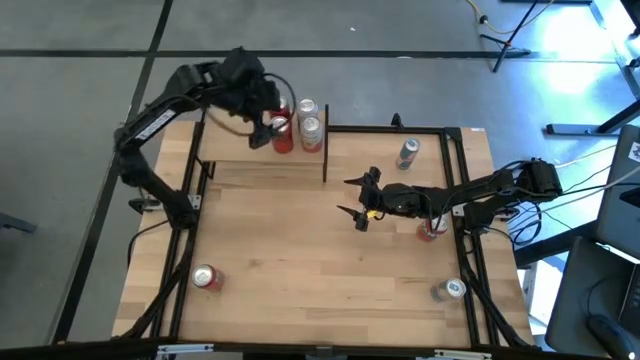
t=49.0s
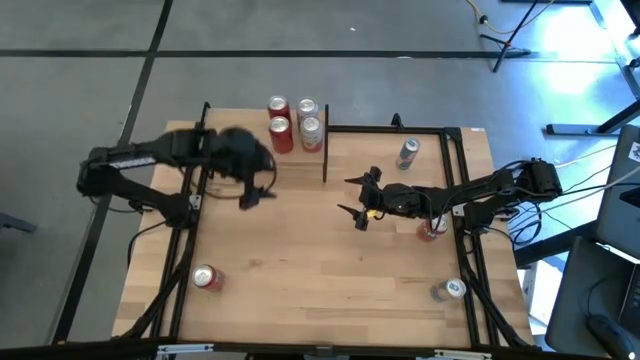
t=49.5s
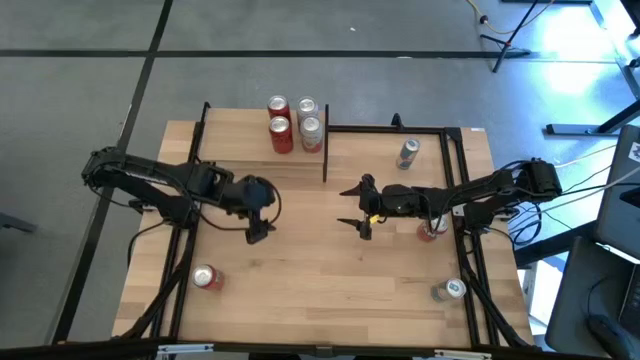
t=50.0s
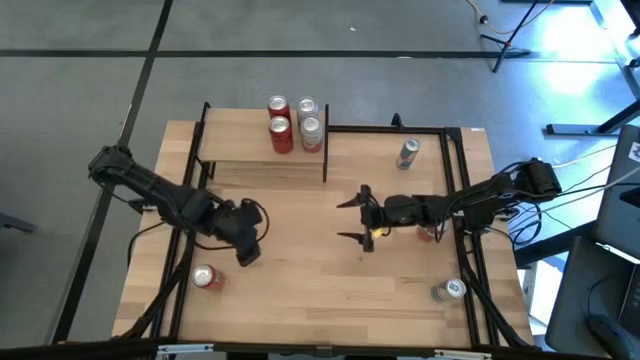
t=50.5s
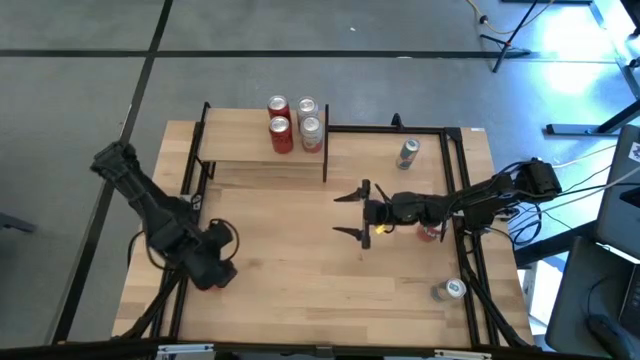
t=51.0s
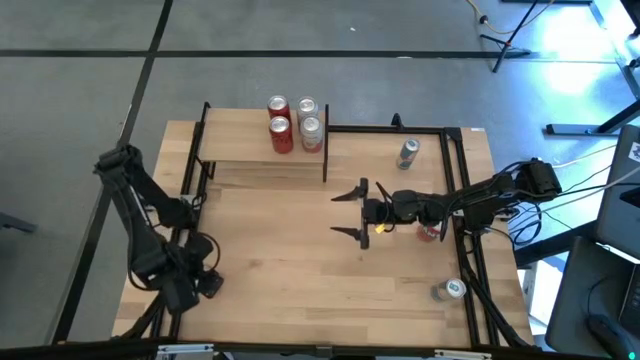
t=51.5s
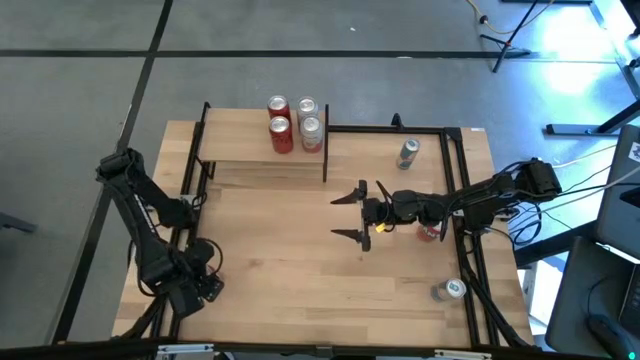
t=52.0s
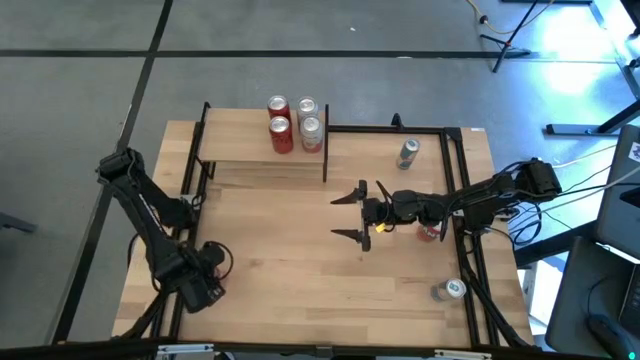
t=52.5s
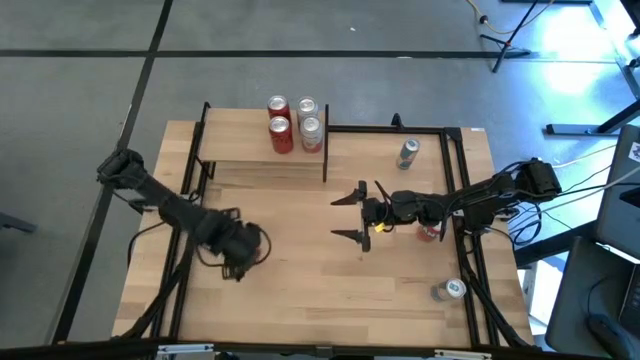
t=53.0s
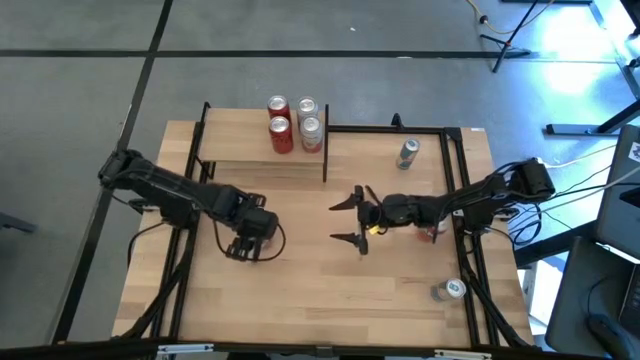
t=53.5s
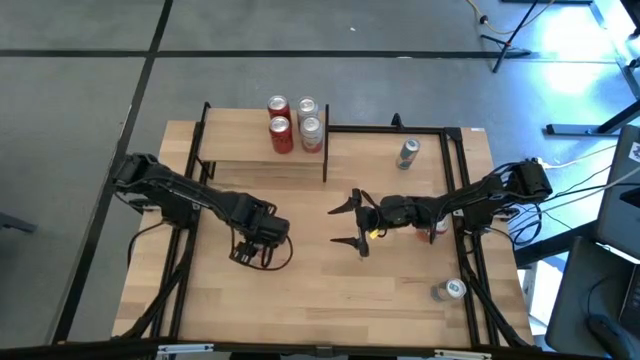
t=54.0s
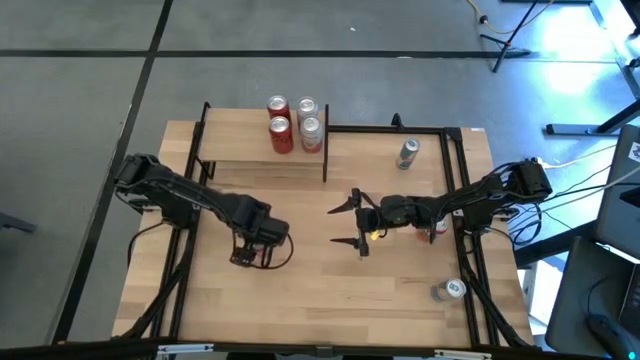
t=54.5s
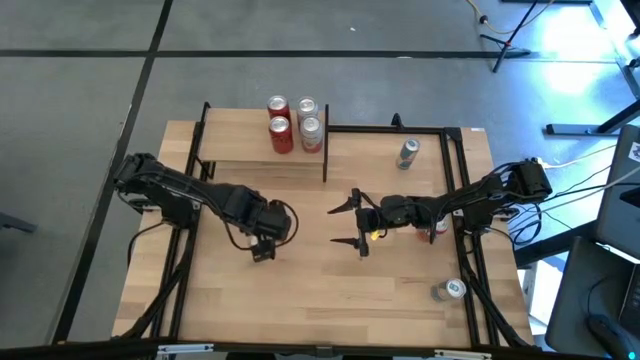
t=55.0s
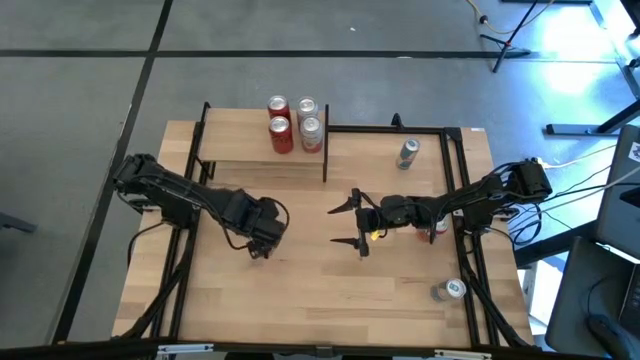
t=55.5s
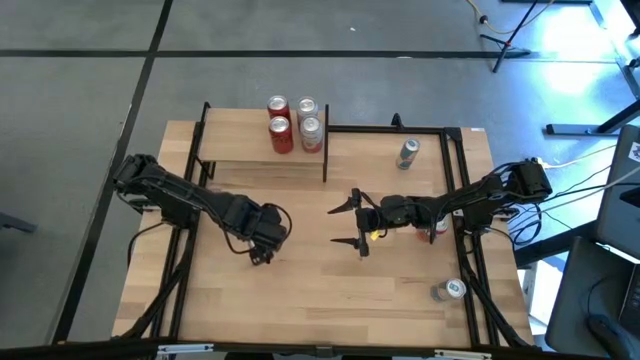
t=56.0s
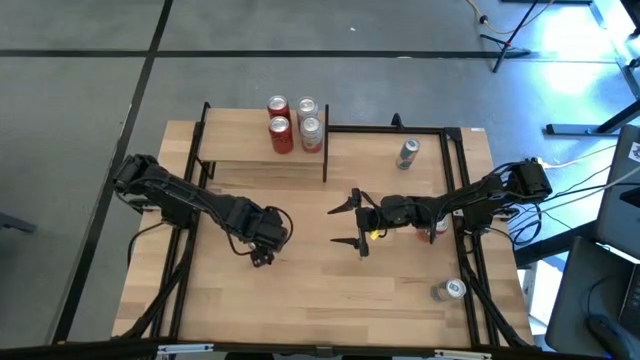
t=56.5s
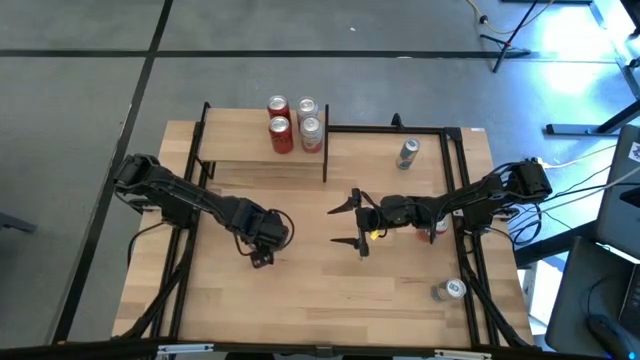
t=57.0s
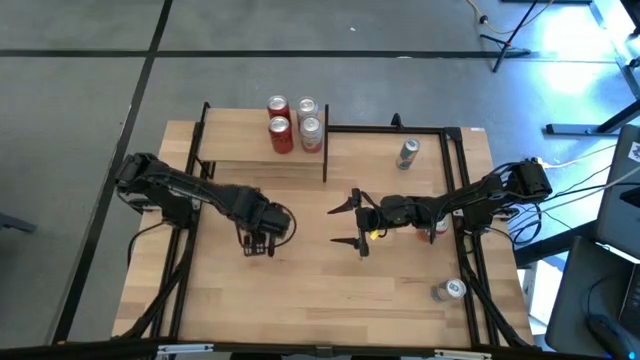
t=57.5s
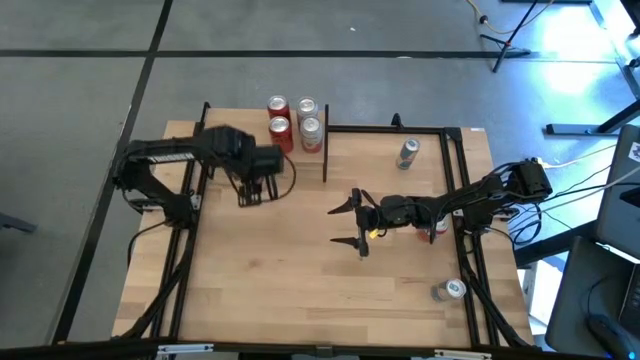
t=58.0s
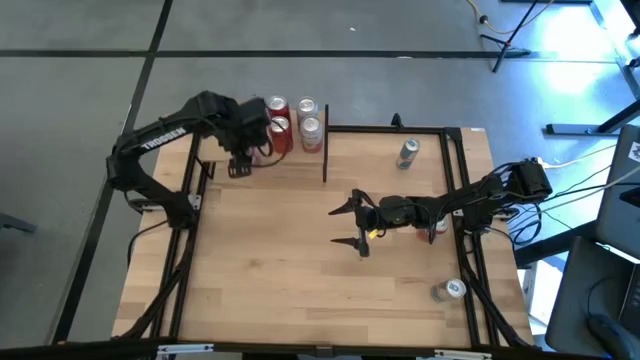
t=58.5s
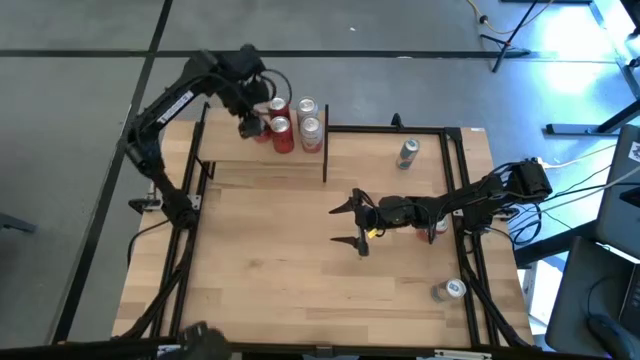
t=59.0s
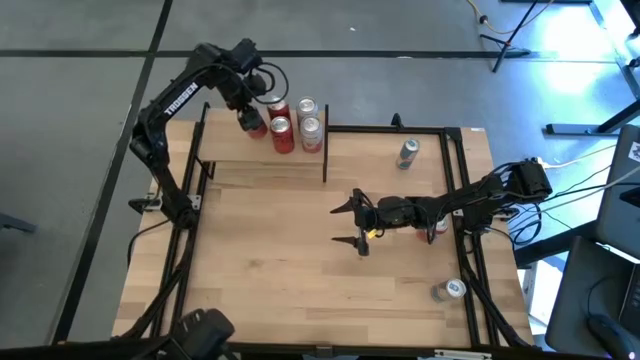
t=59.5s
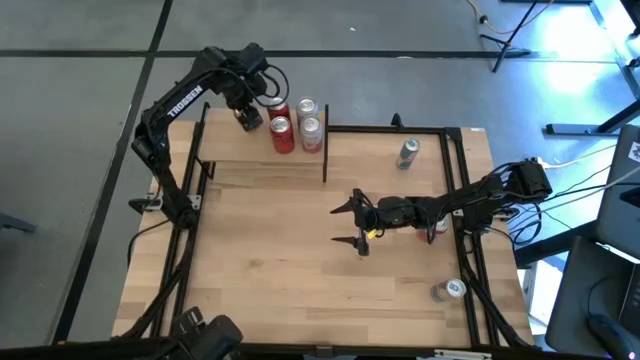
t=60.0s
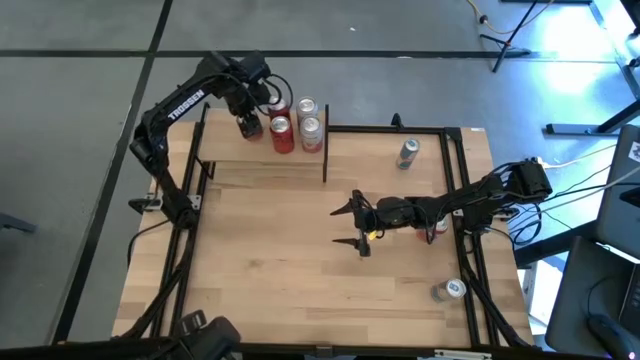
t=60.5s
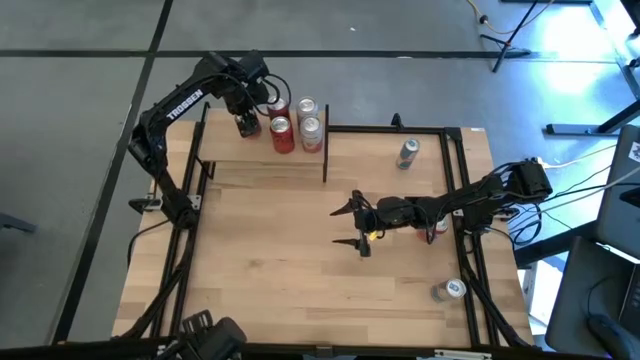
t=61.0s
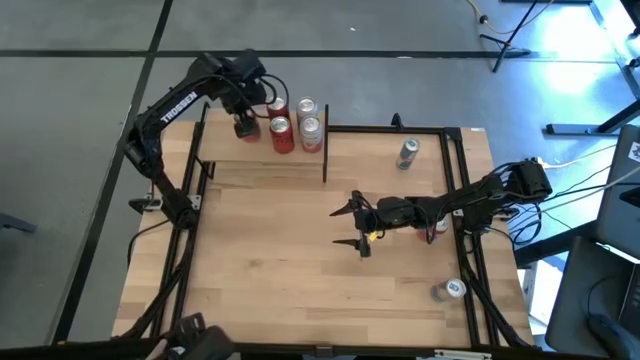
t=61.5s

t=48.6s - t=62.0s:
Task: Place canned beverage on shelf
Put the left red soda can on the shelf

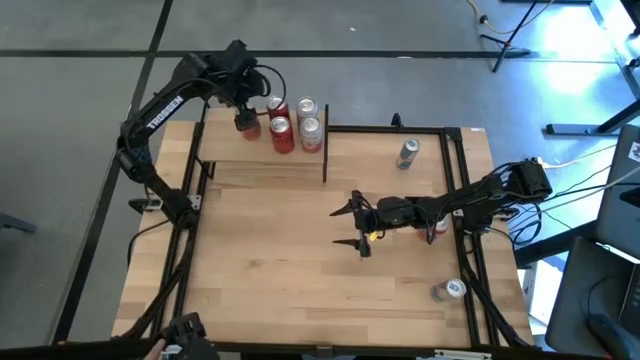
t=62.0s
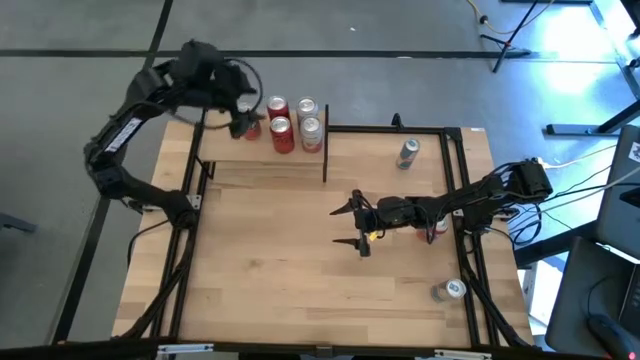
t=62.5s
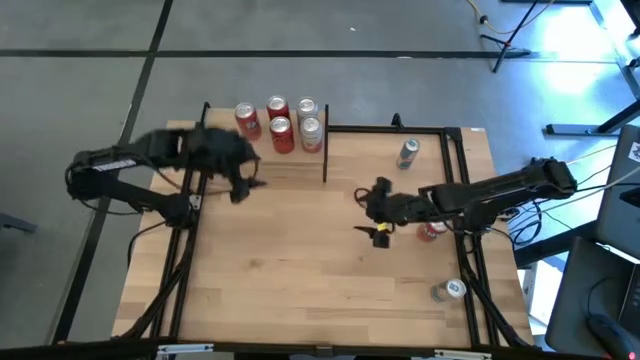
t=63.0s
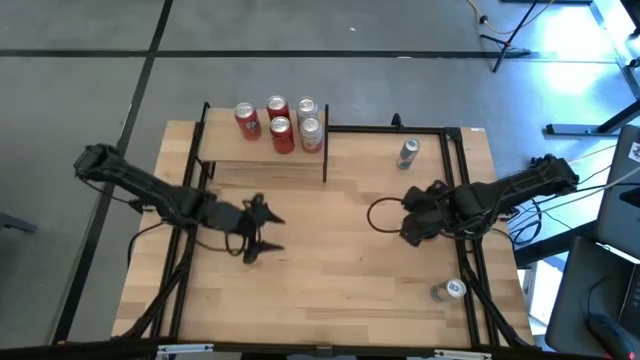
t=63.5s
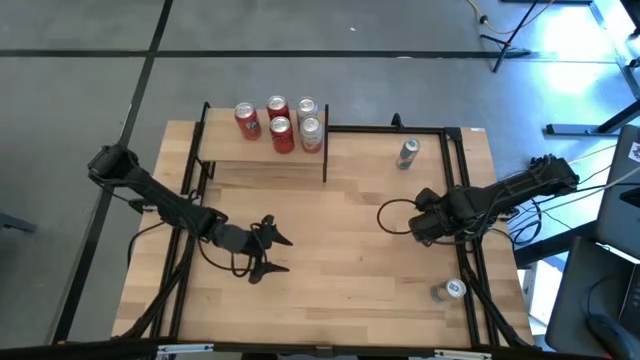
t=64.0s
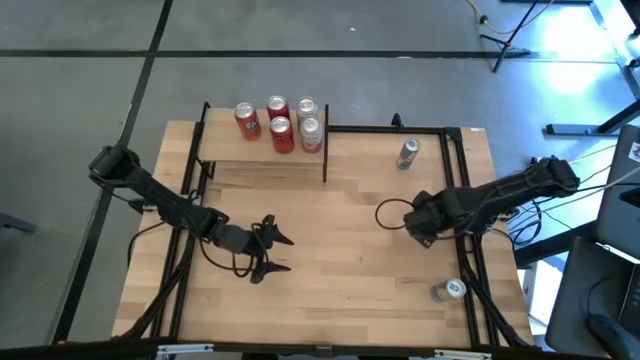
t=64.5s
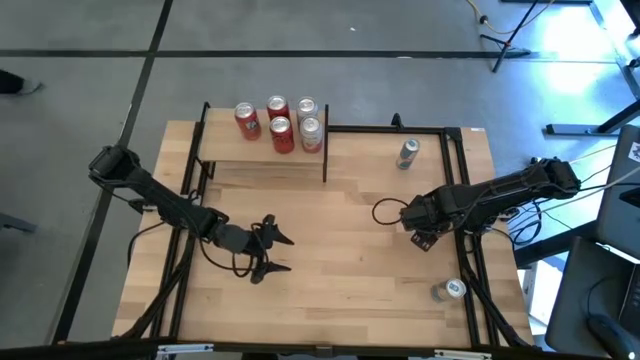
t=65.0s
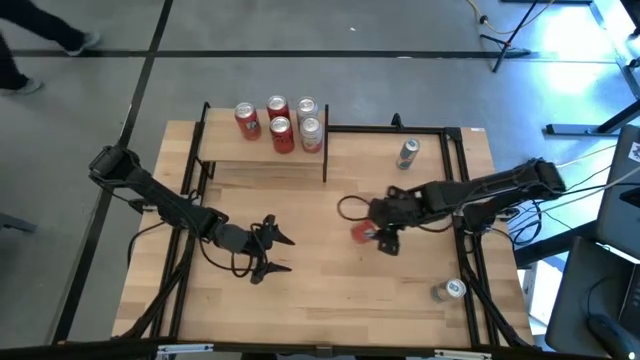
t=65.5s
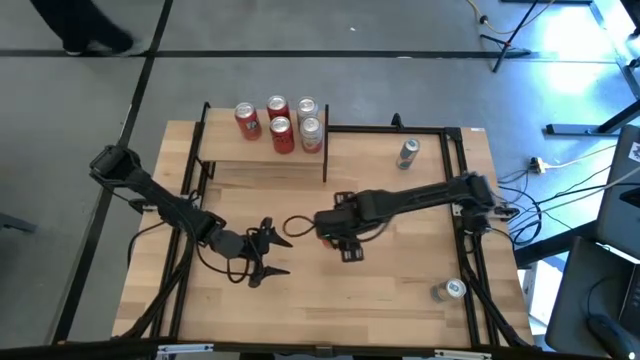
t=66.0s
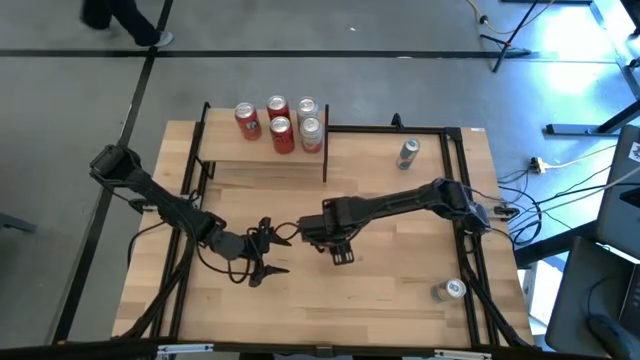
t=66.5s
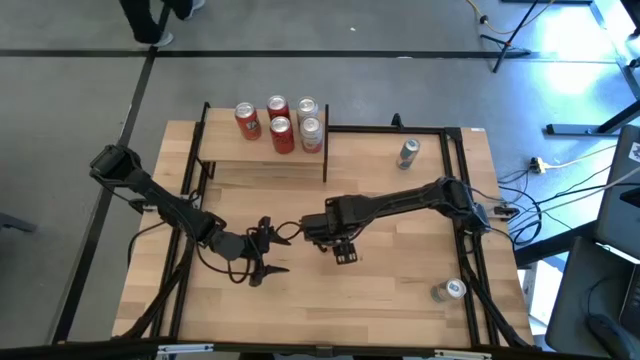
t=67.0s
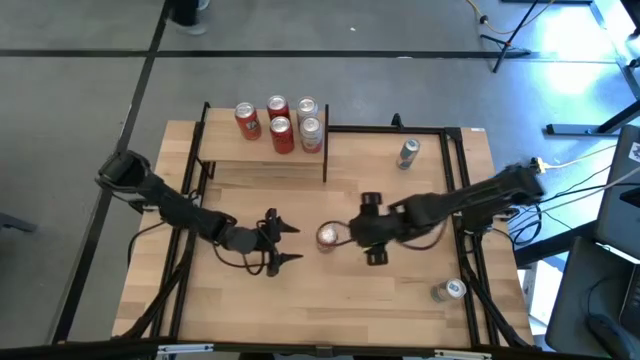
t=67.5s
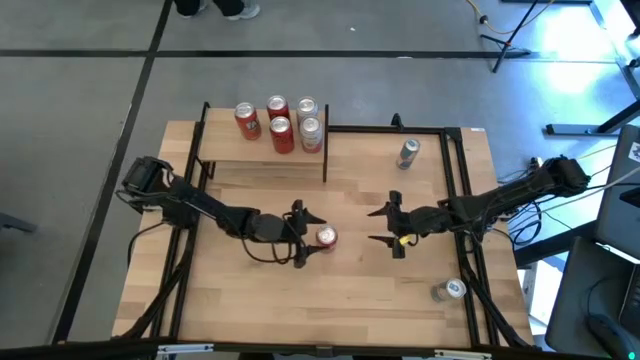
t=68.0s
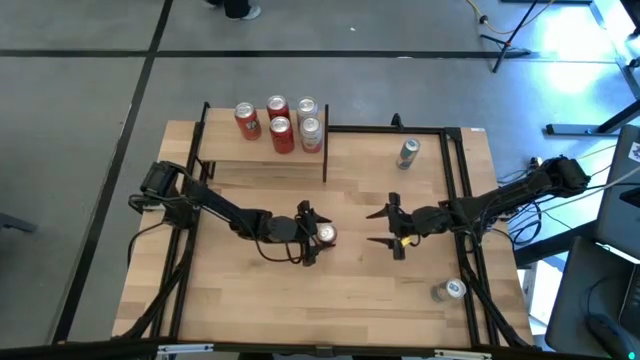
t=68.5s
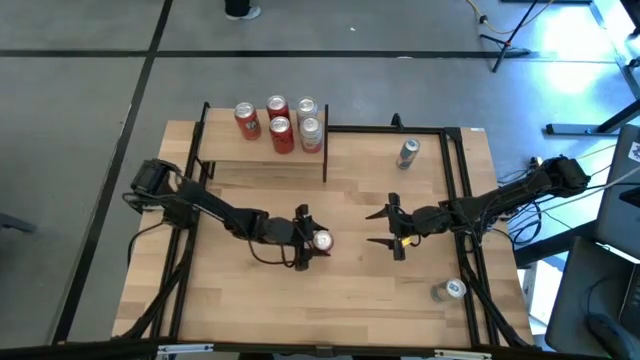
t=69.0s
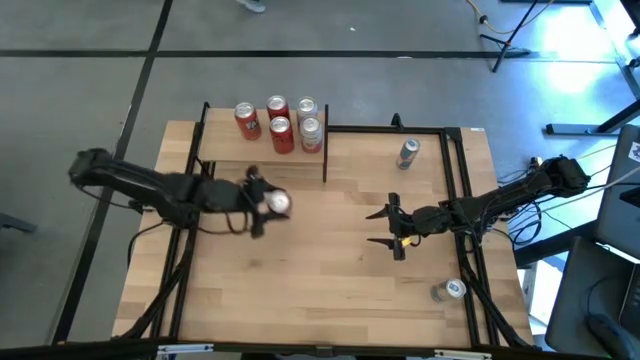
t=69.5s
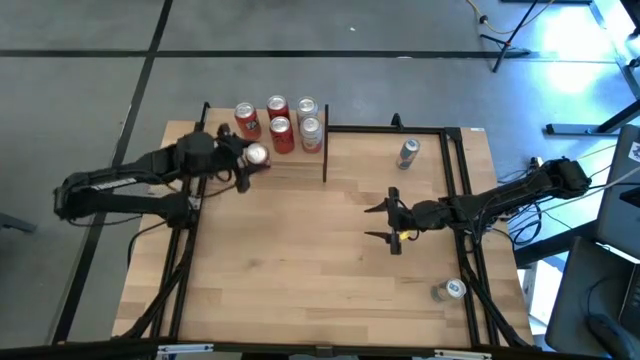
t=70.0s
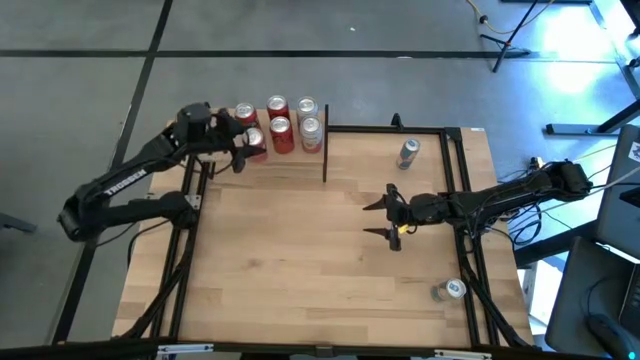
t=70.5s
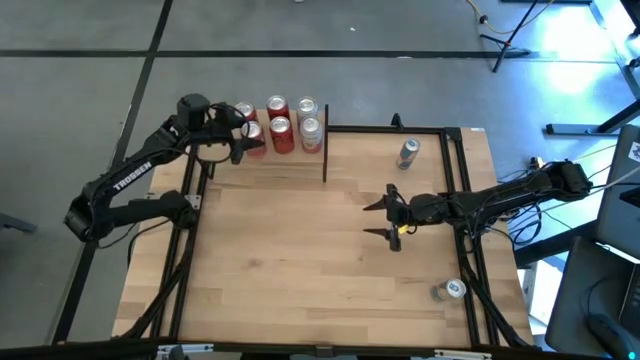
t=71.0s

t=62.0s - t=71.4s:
Put the red soda can aligned with the other red soda can on the shelf
